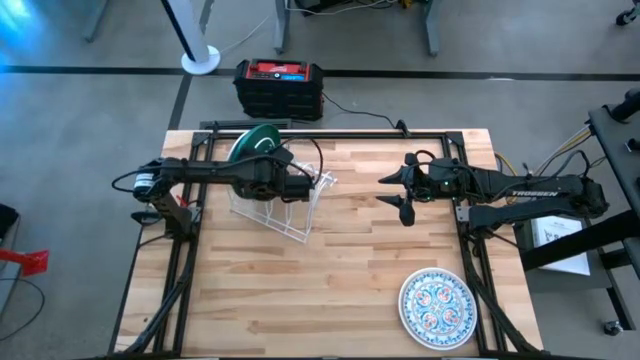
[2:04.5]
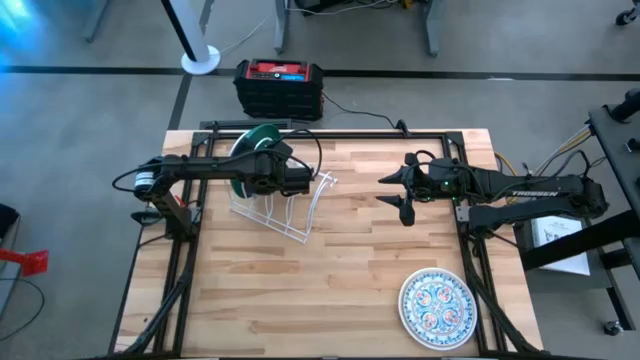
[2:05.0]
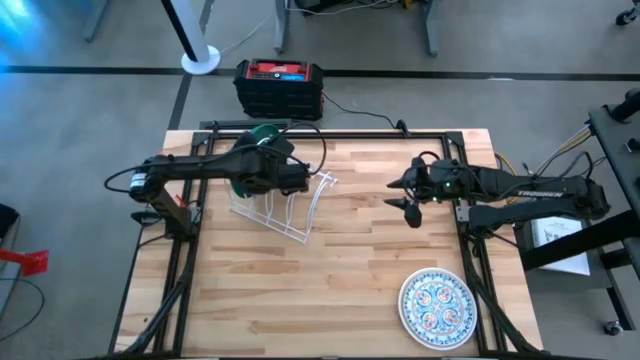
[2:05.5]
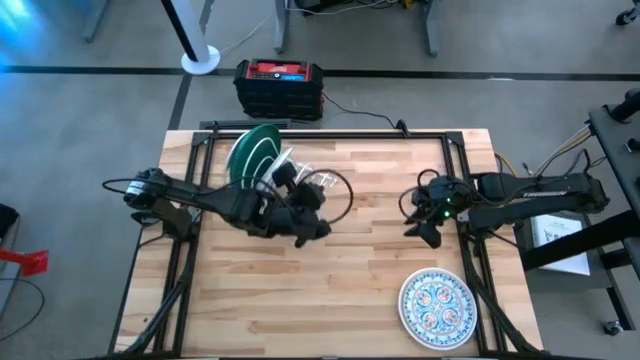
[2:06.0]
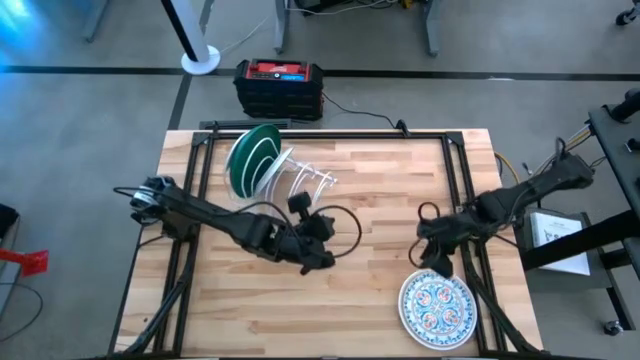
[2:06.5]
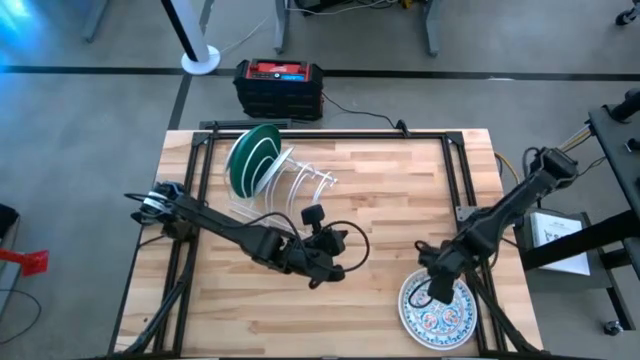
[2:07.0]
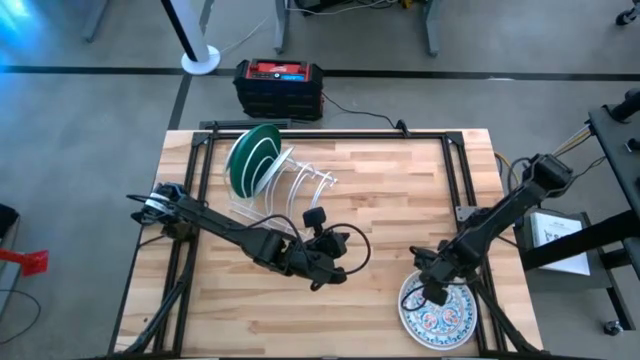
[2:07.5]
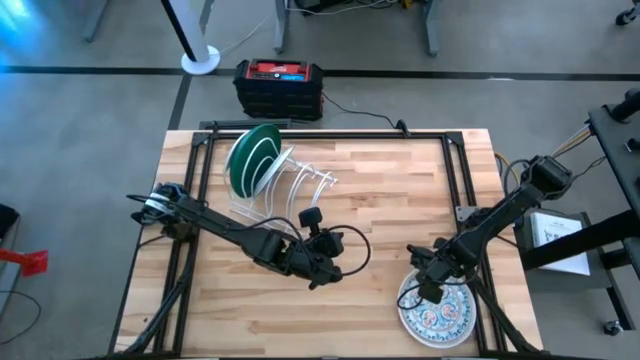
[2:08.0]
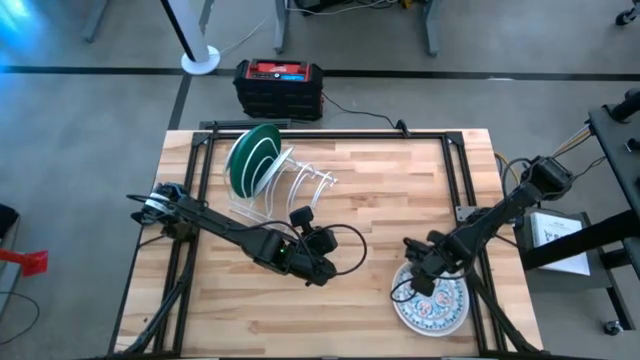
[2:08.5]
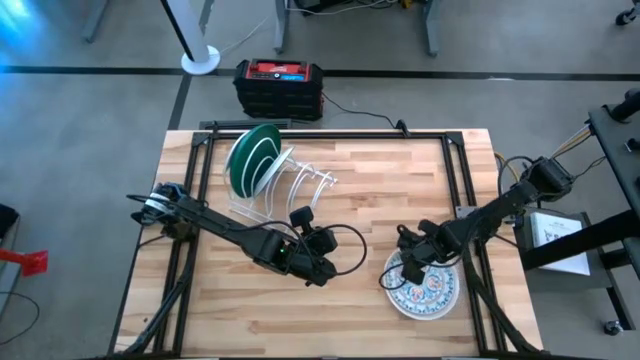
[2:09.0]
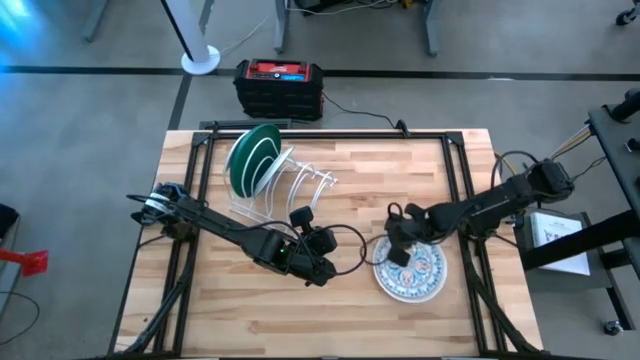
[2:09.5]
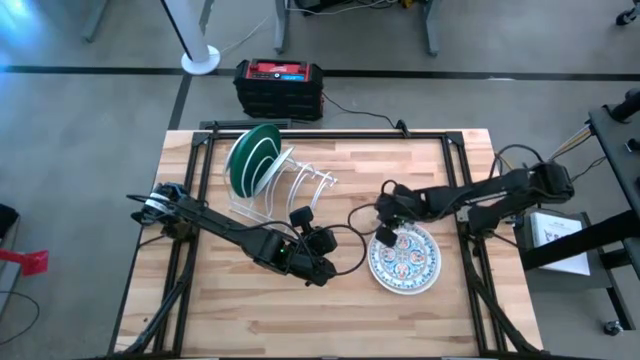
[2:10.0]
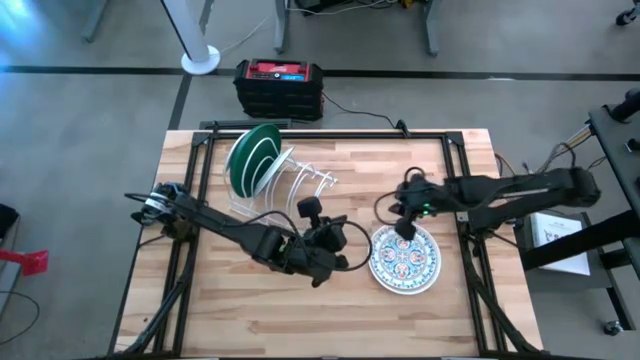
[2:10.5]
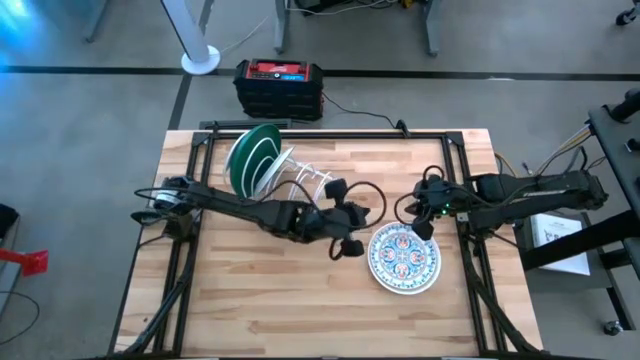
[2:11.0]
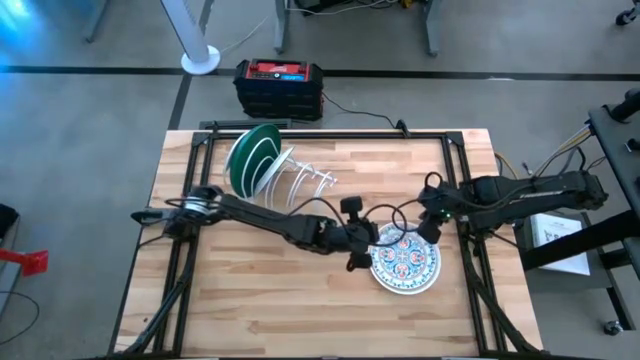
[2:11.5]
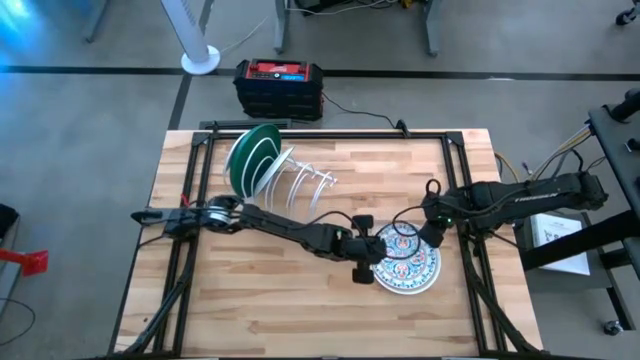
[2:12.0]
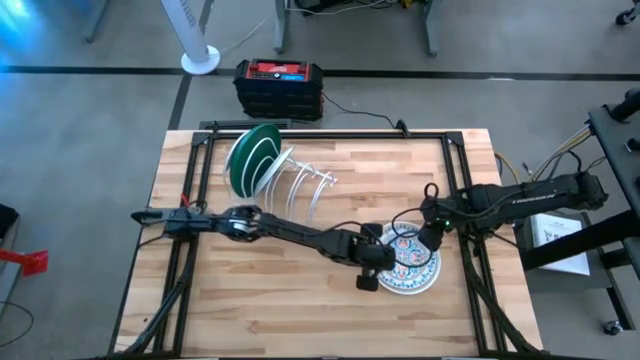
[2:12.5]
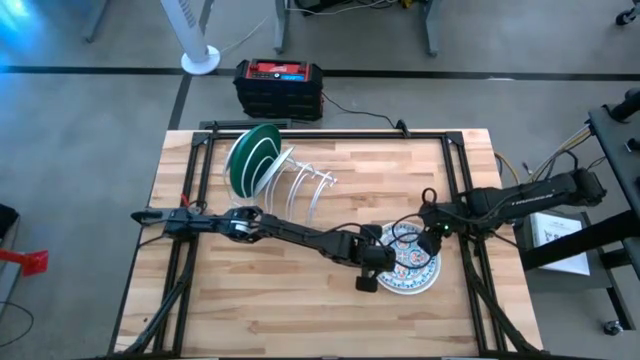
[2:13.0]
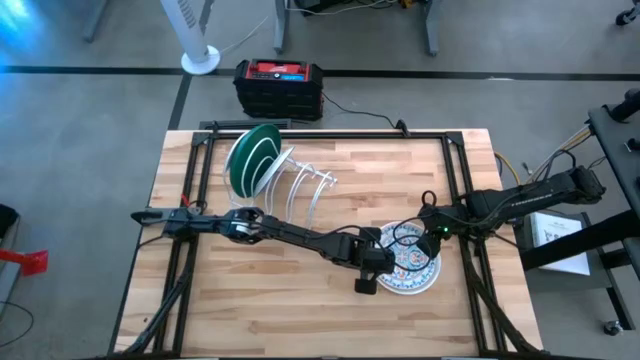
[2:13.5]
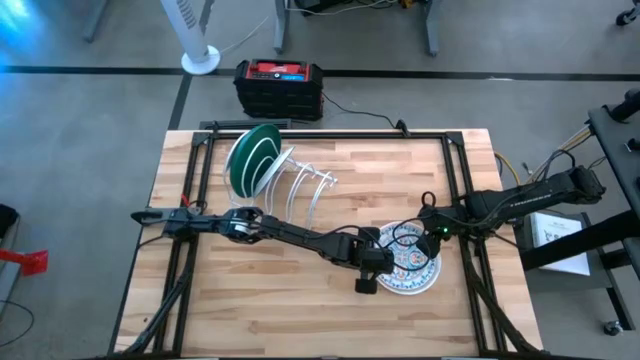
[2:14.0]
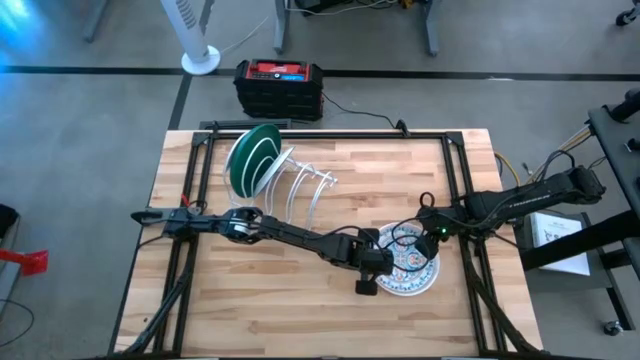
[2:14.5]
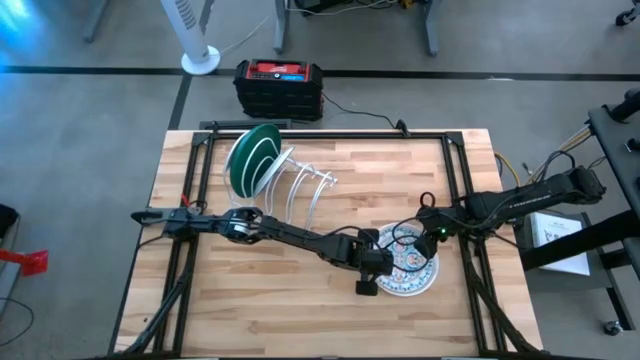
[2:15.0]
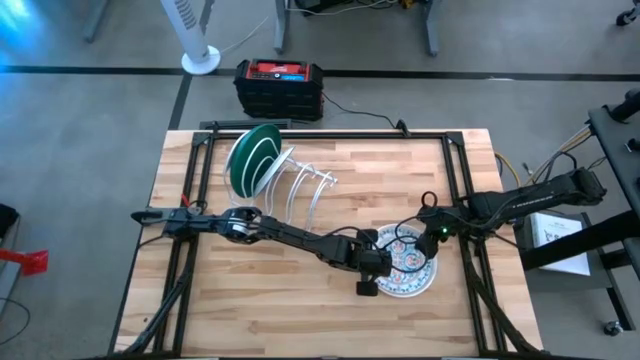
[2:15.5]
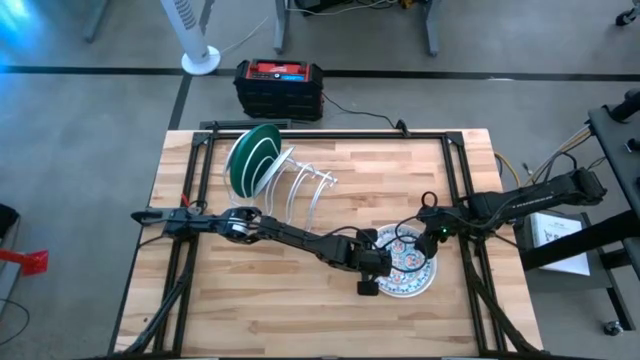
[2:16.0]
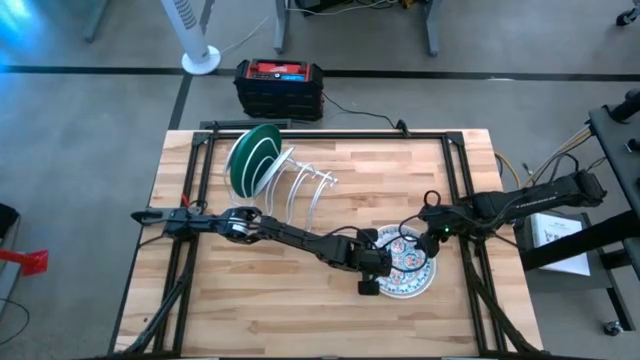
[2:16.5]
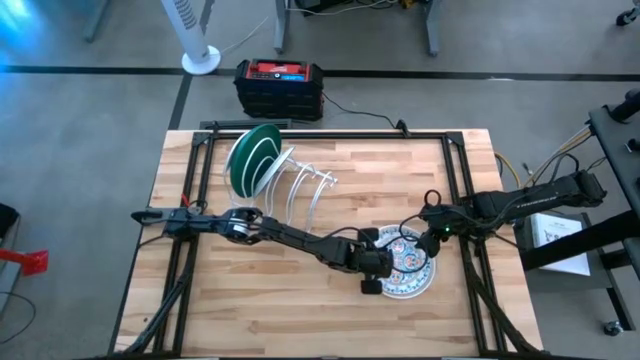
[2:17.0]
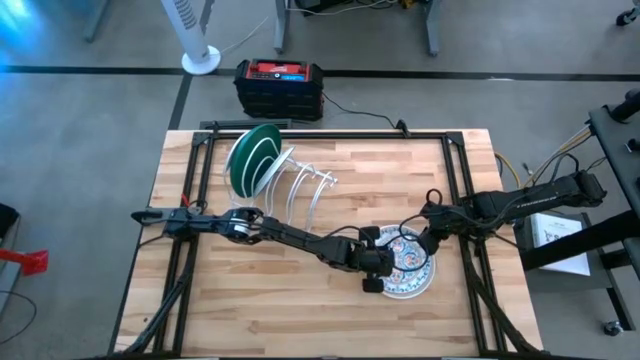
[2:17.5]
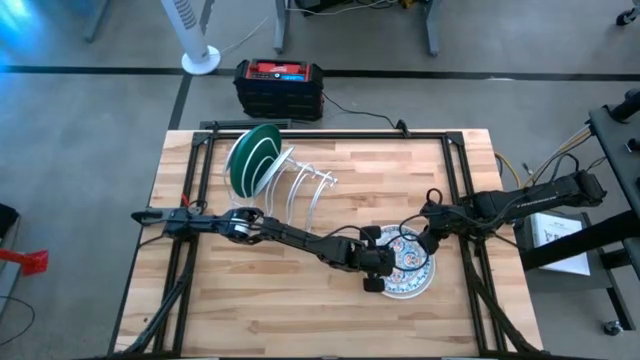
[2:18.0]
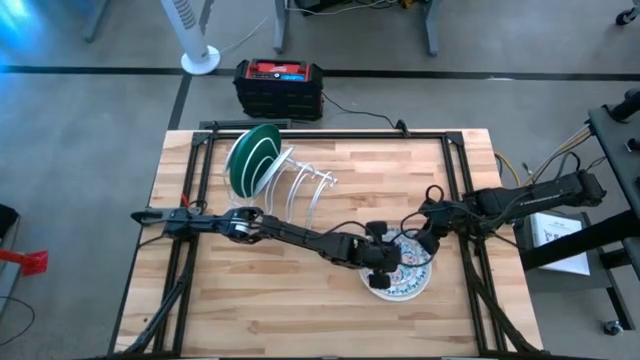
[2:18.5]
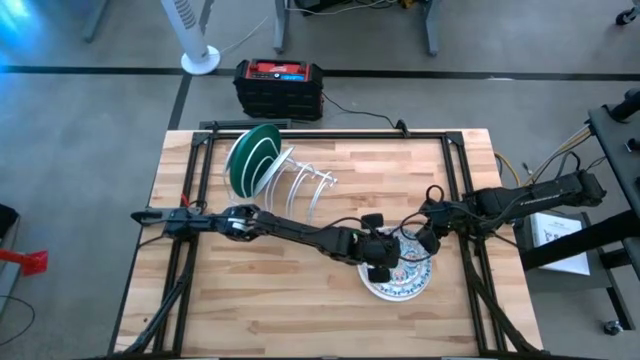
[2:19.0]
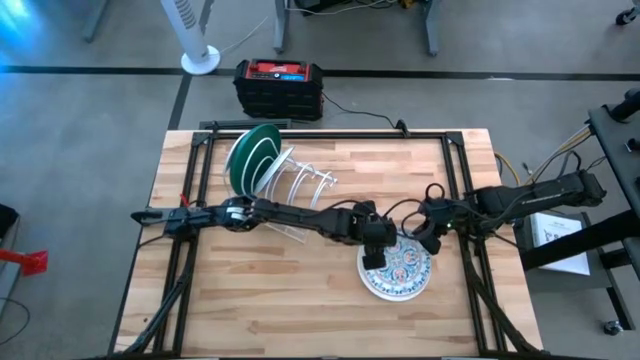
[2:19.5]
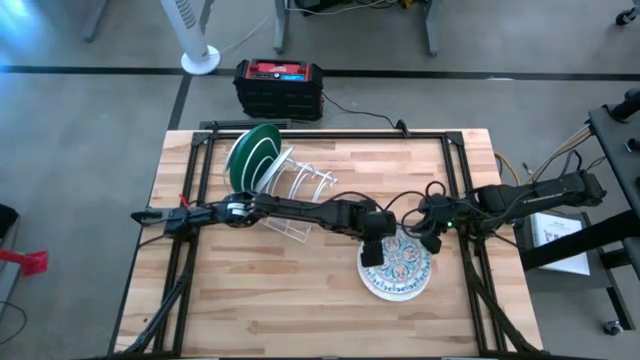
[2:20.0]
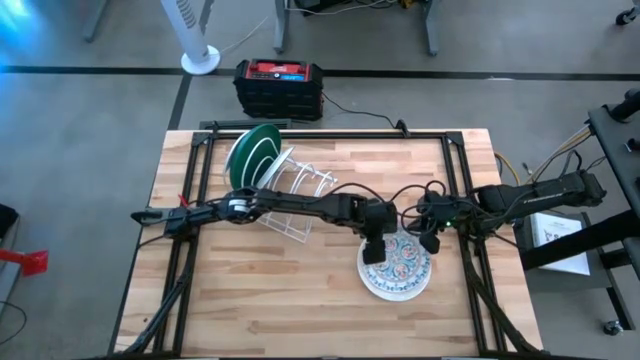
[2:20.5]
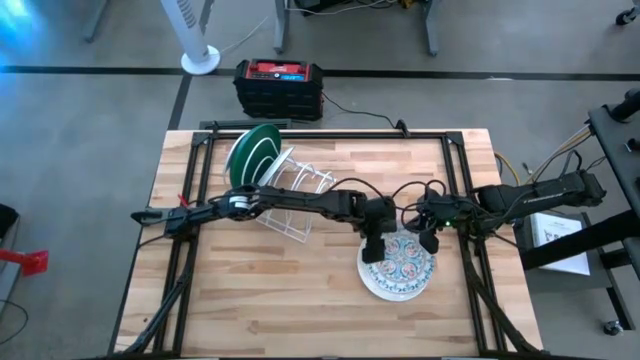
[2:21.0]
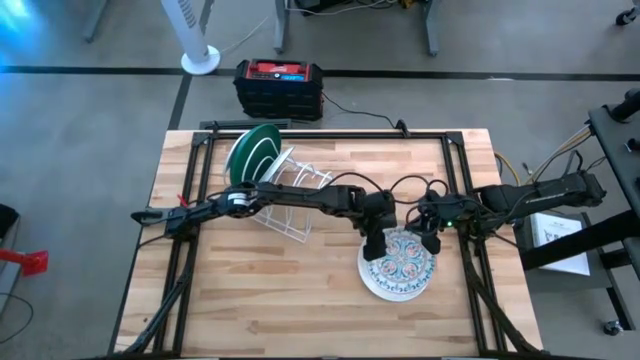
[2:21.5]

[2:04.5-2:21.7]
Task: Sort dishes
Put the blue orange patterned plate in the dish rack

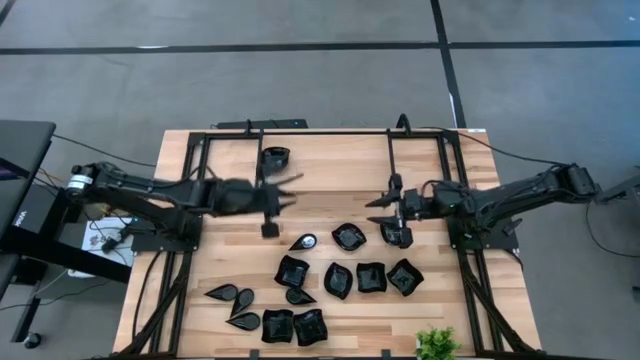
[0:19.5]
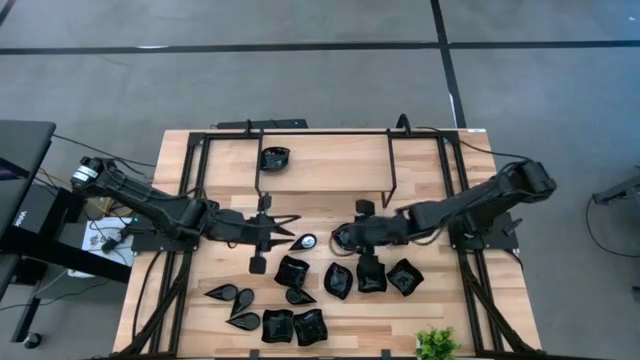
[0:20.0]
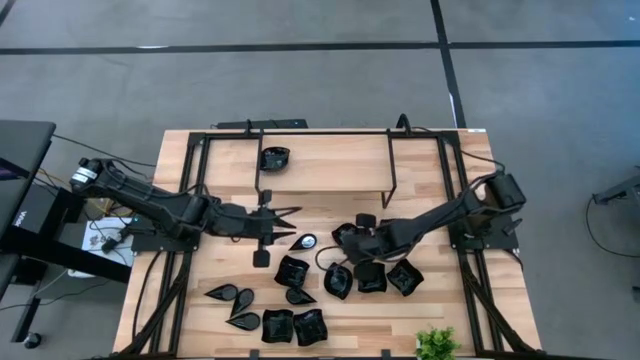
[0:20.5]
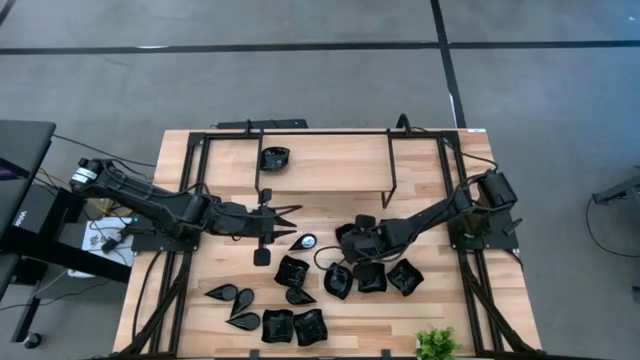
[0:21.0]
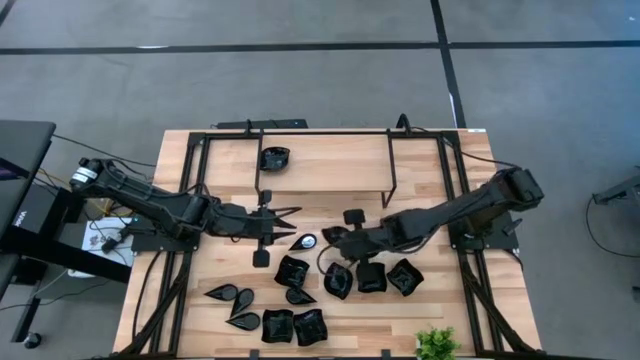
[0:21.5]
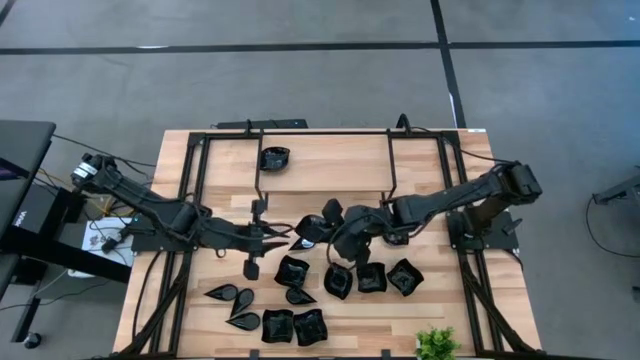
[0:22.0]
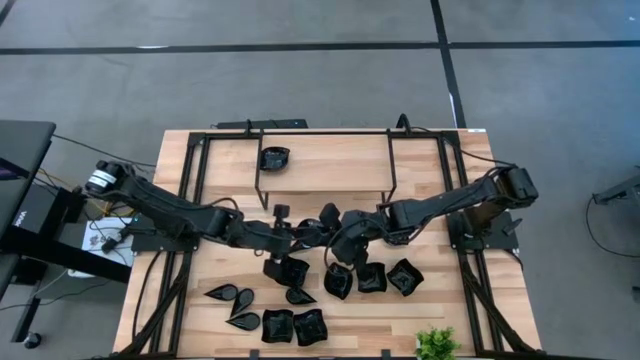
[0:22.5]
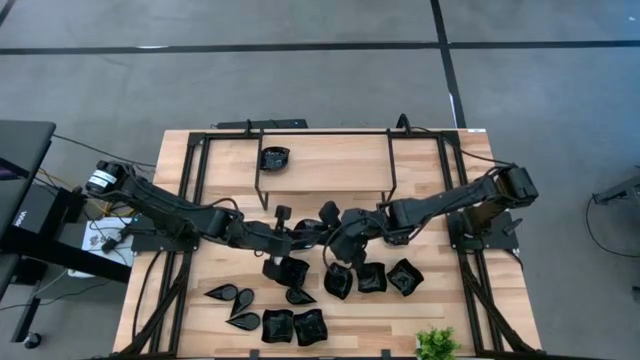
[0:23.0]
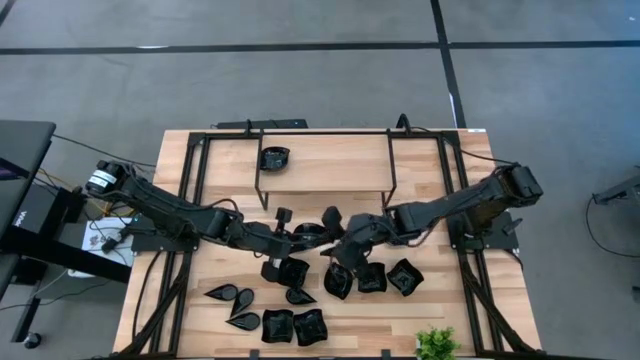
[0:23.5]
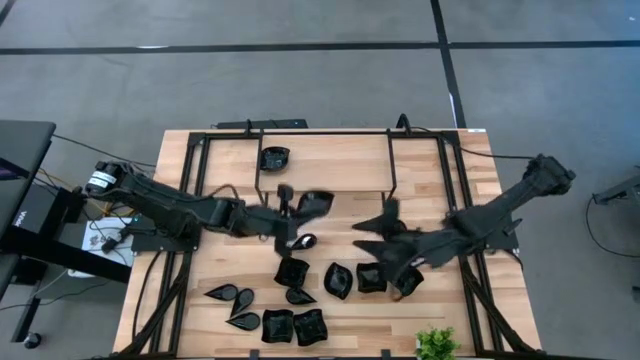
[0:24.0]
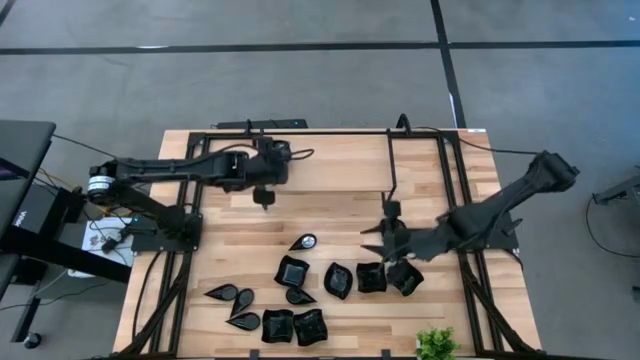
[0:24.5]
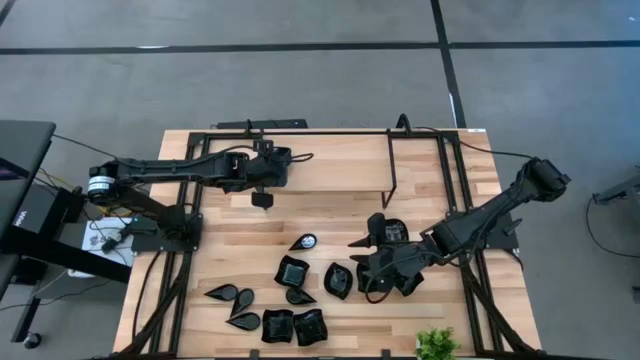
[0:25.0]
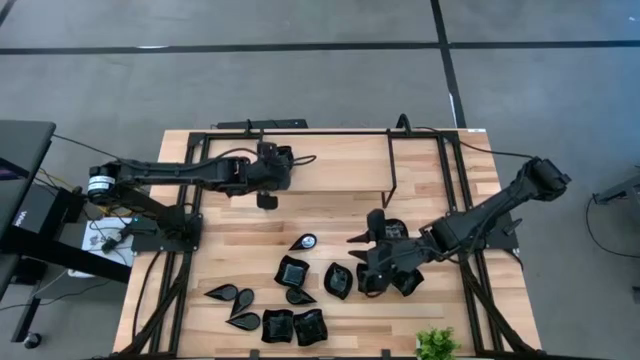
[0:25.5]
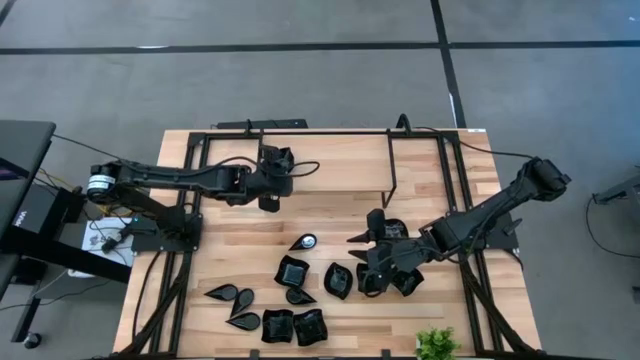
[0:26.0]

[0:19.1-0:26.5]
Task: Pick & Place Mini shaped plates
Stack the black leaf-shaped plate on top of the black leaf-shaped plate on the shelf
